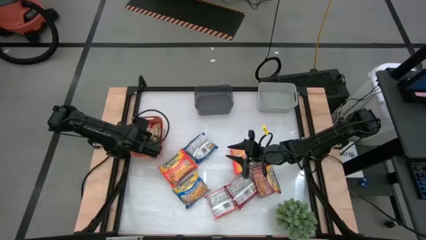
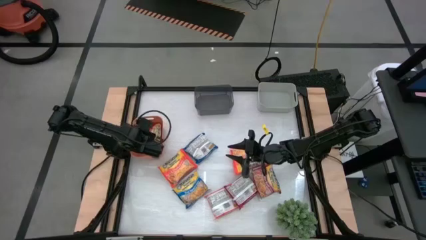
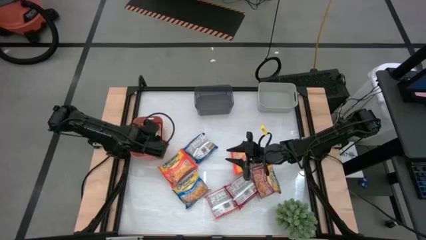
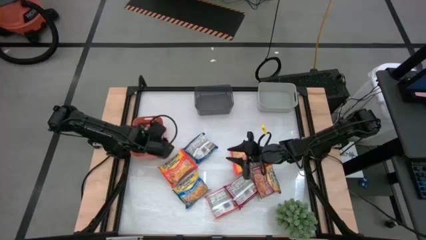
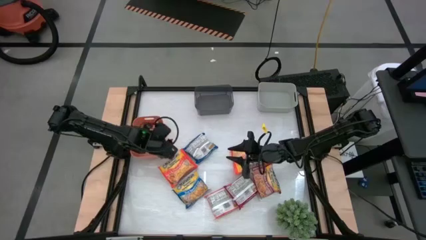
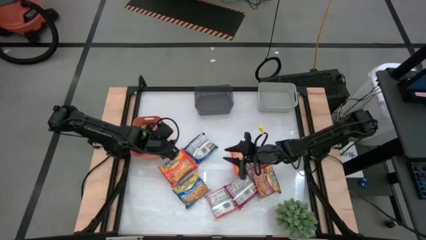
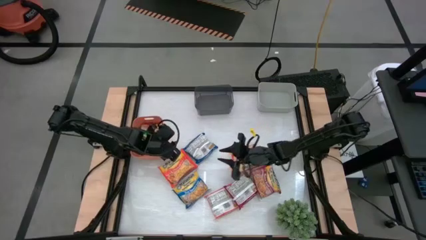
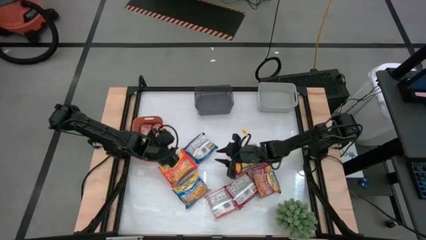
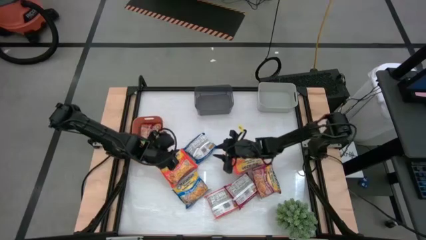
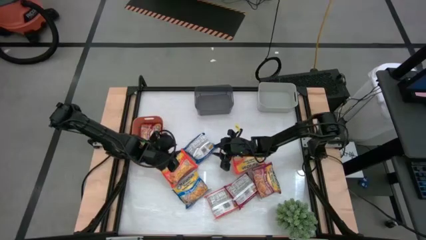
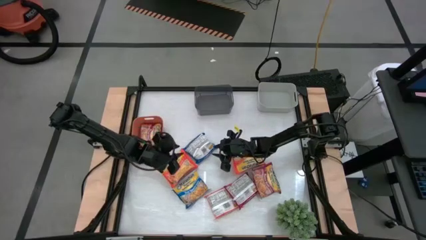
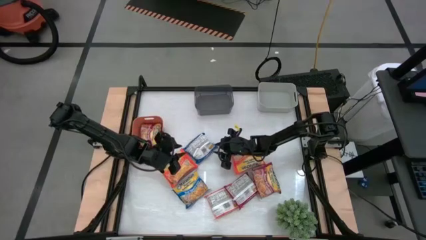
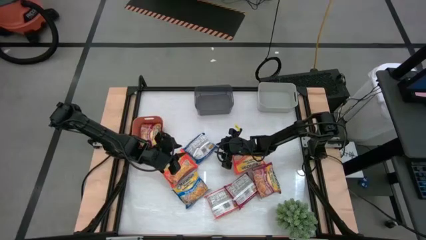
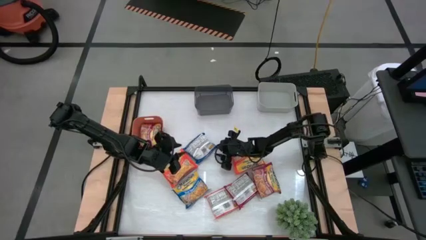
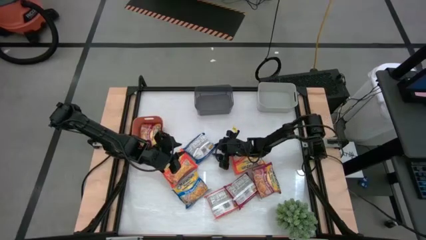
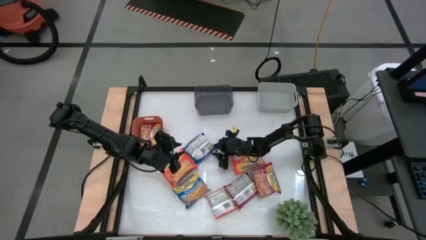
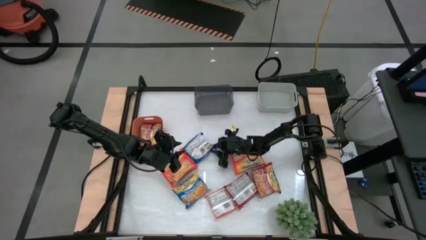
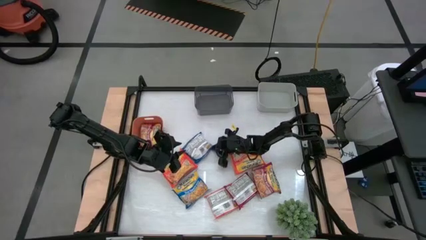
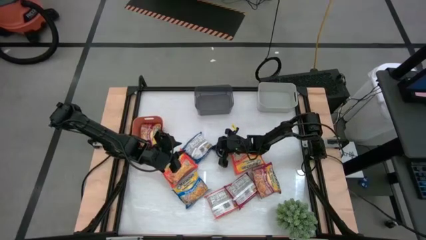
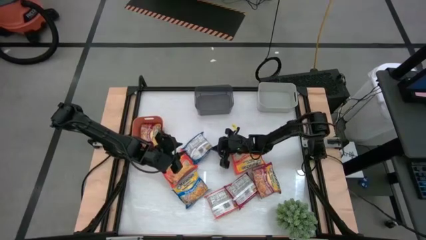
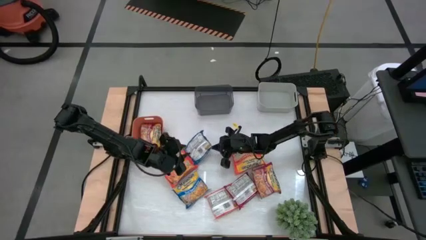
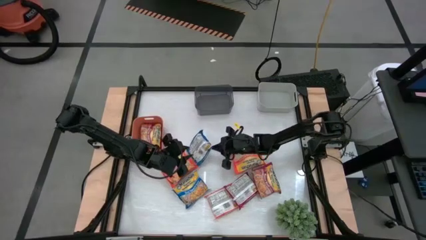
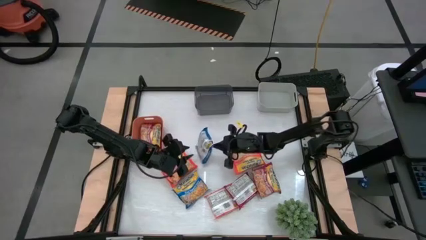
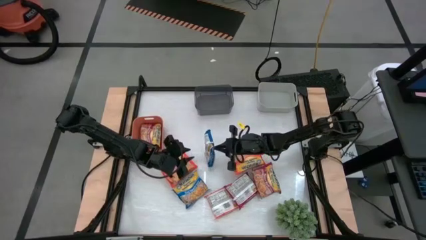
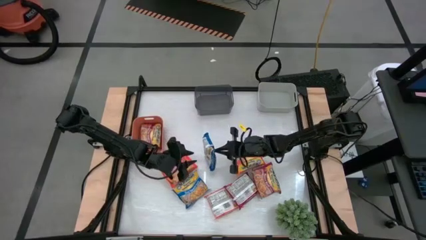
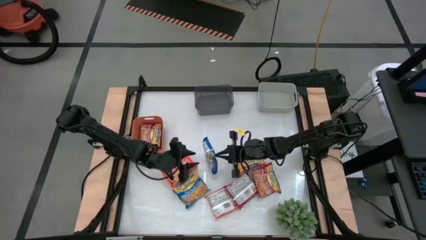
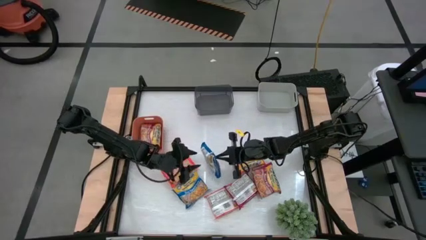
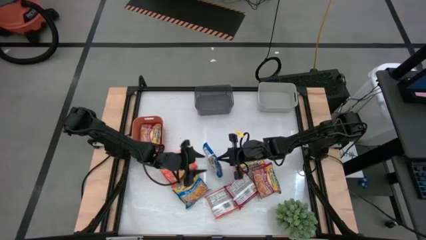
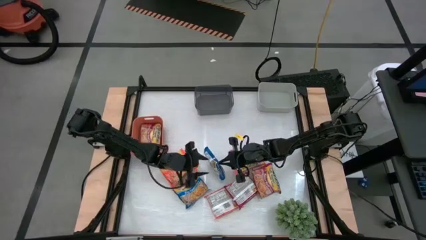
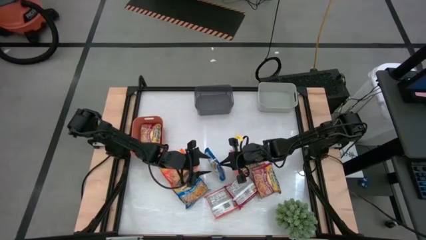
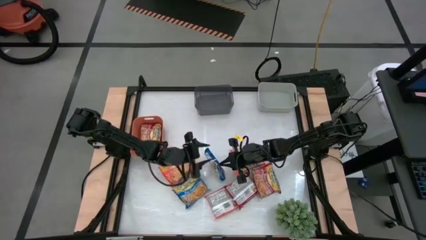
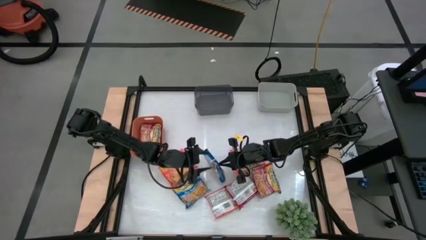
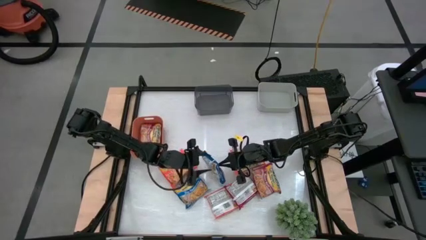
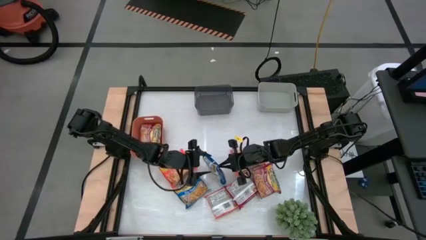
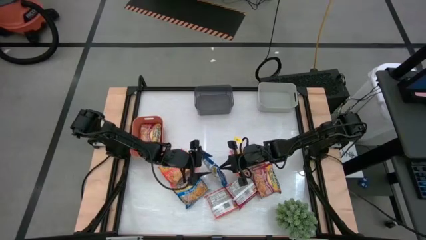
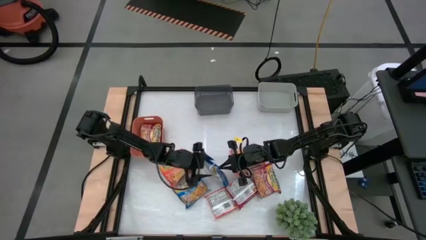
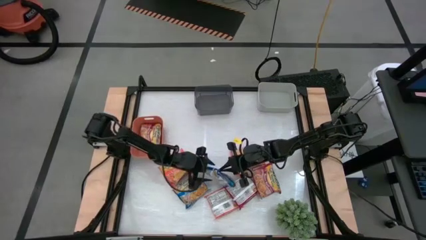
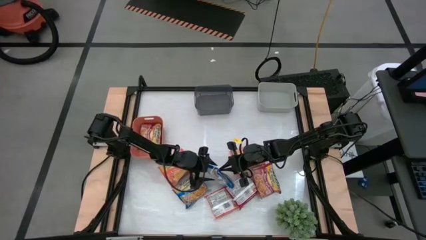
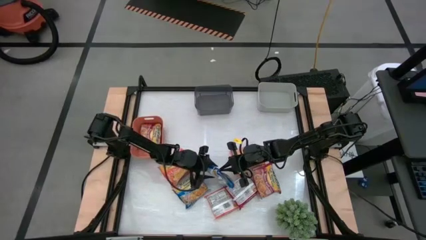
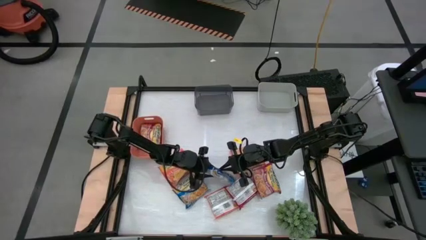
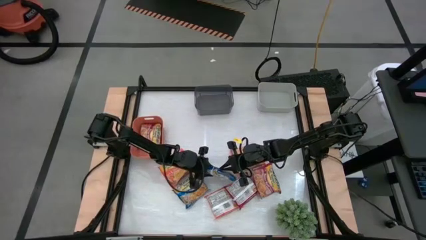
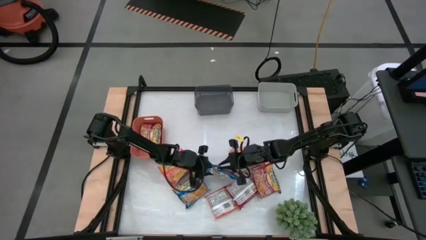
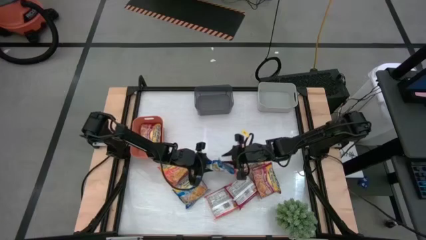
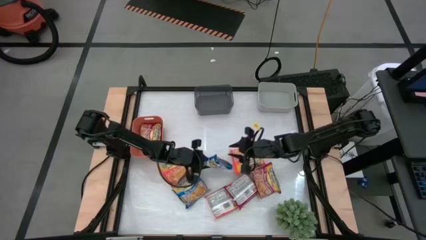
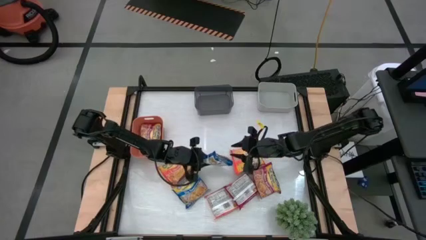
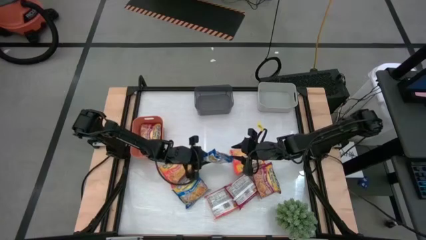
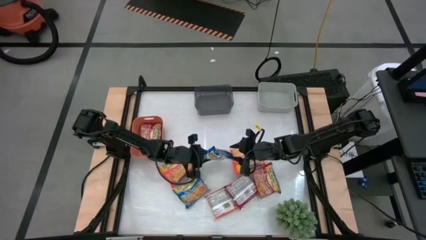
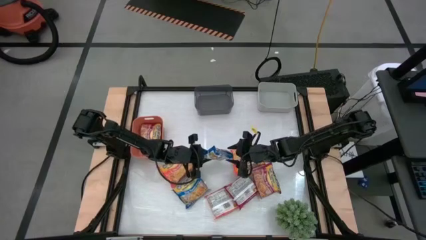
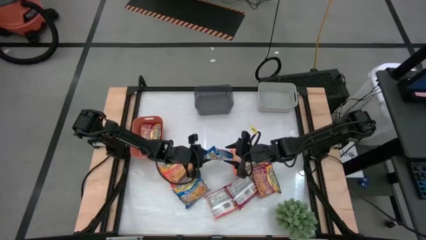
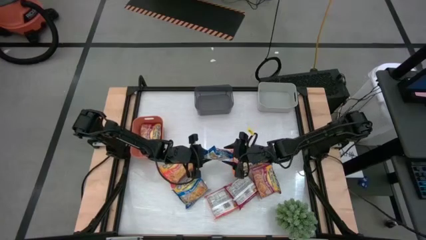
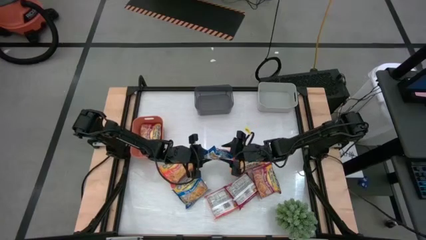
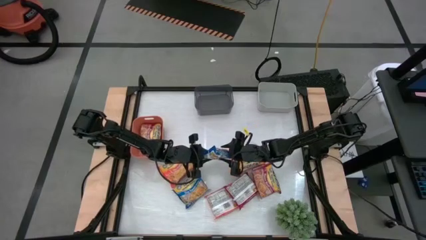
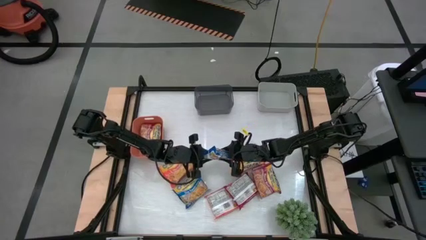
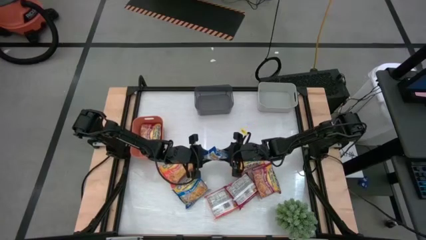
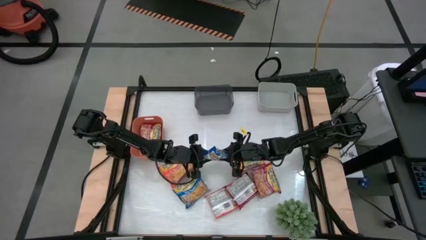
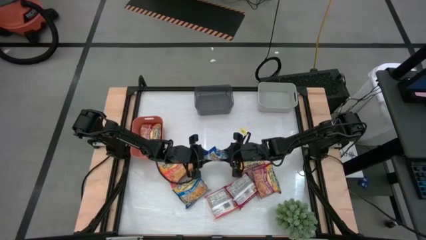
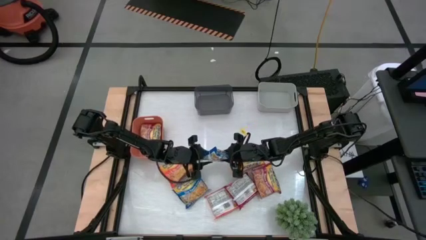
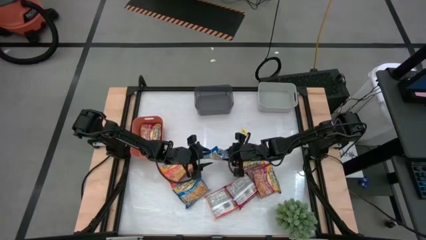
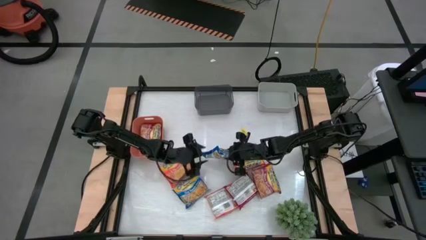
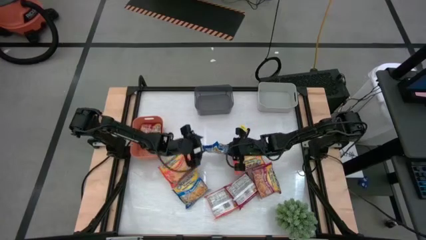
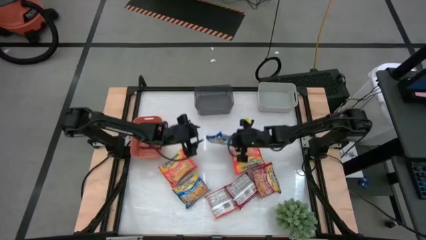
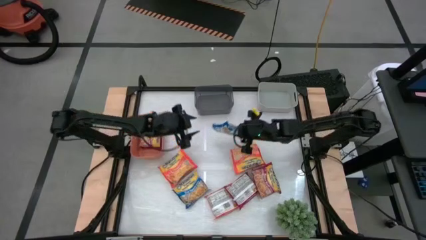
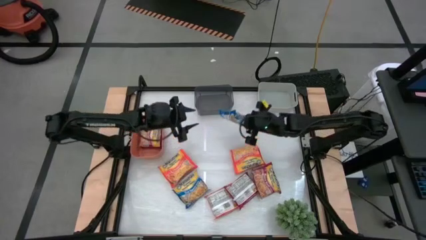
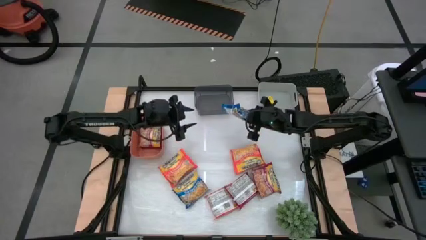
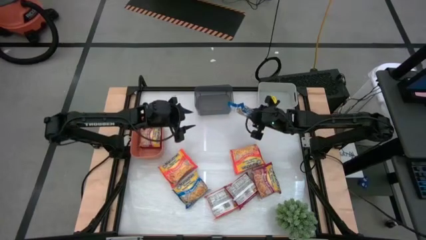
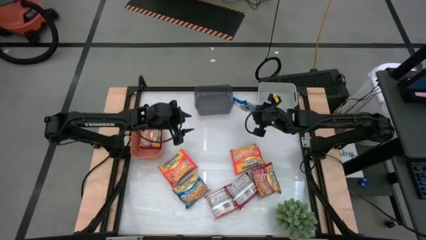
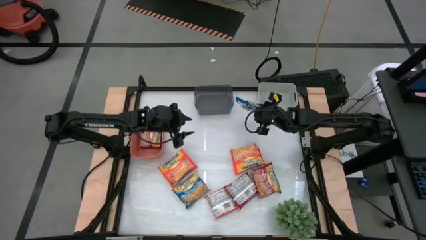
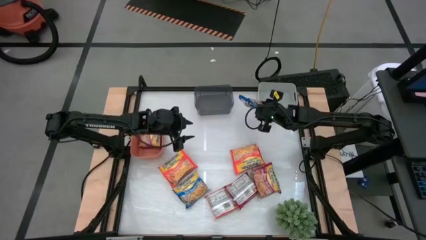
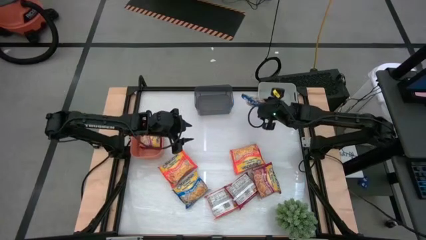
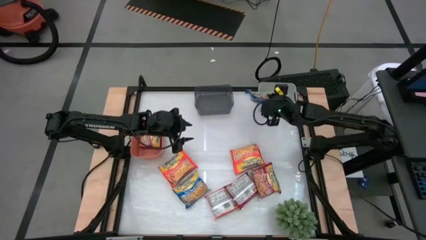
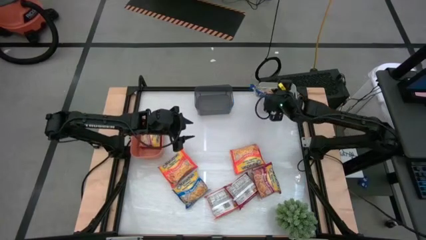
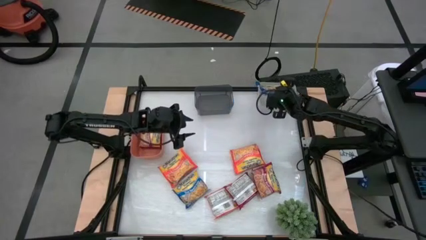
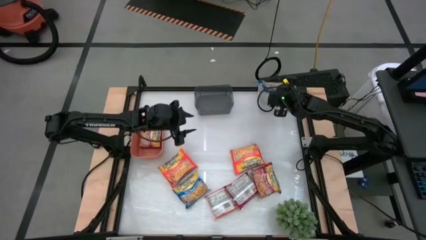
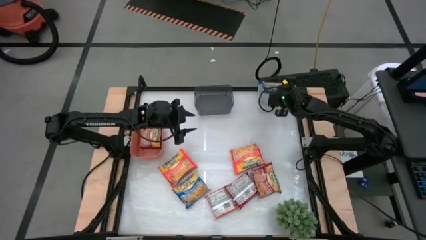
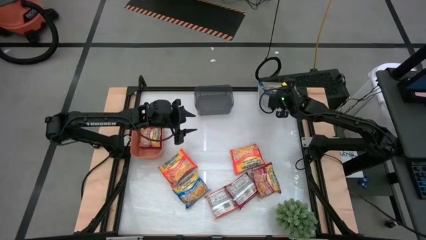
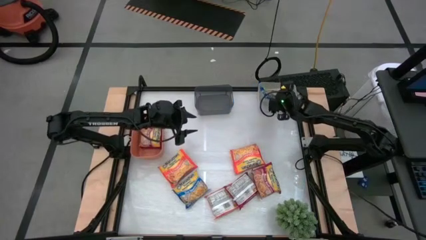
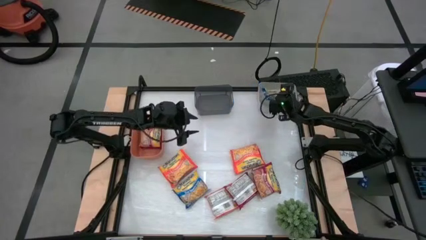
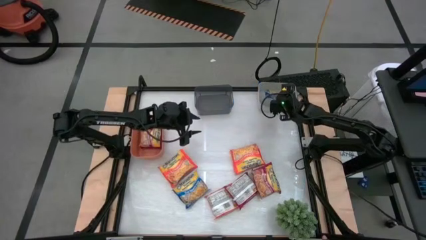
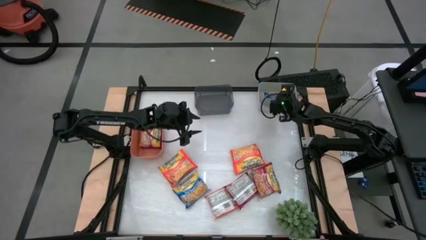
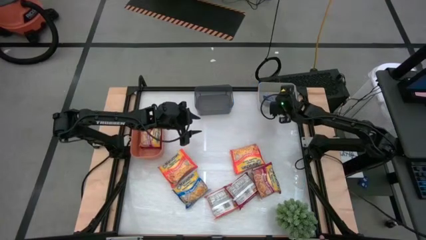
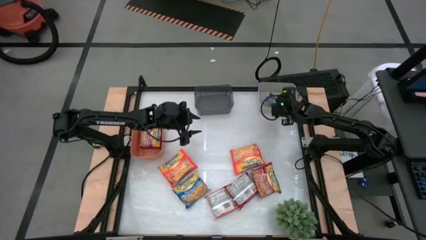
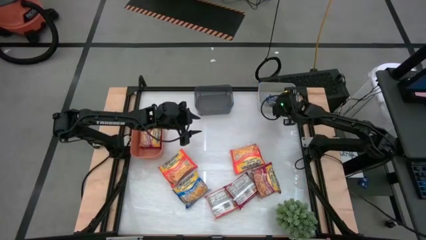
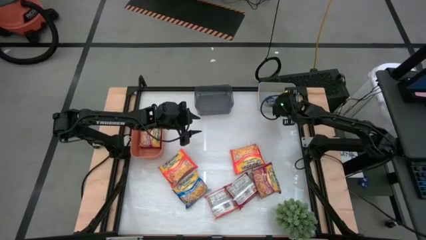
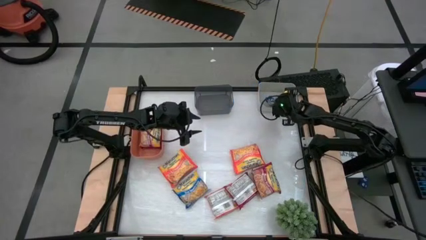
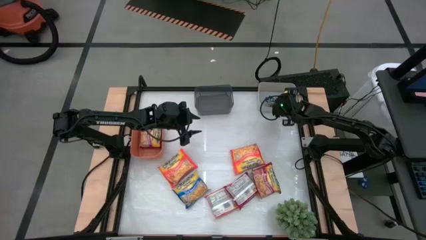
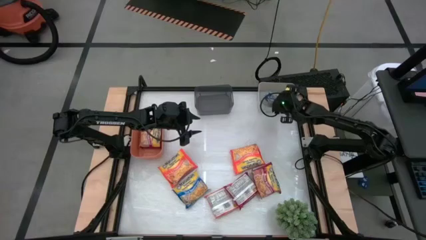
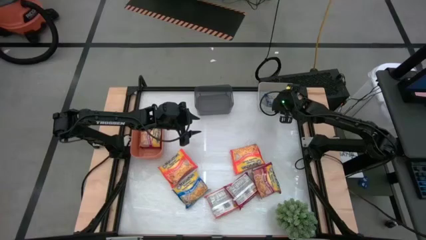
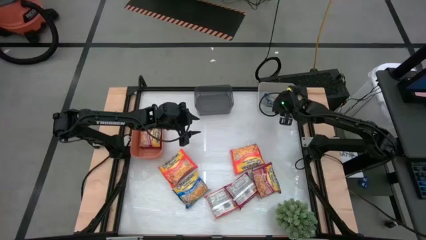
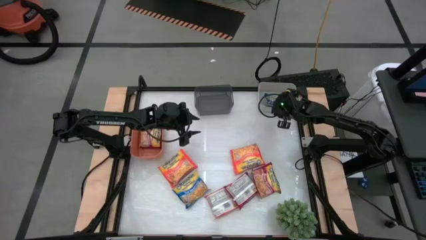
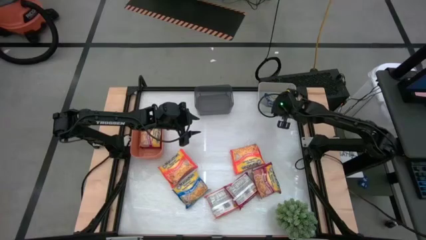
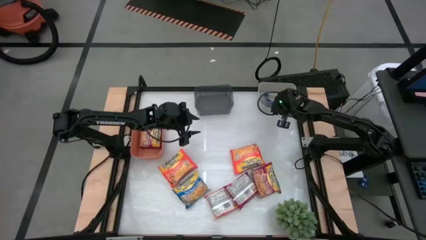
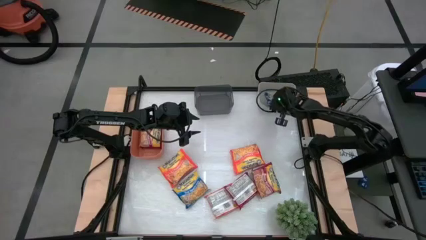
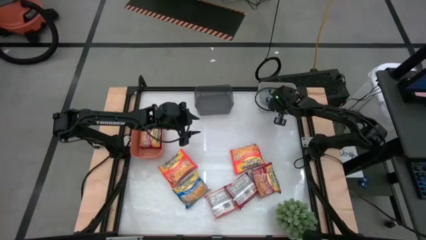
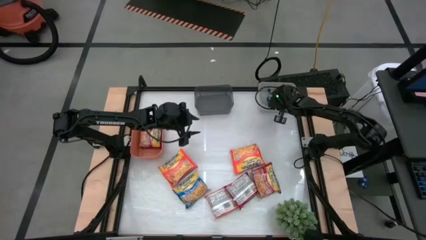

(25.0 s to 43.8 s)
Task: Sort Maruchan noodles
Put the top blue noodle pack into the gray bin
